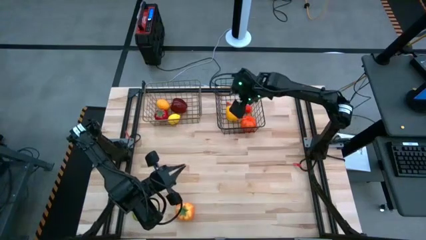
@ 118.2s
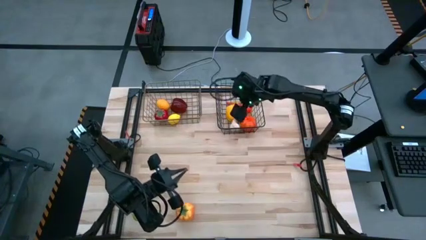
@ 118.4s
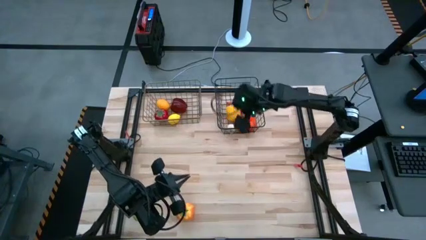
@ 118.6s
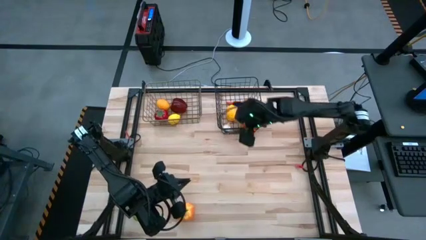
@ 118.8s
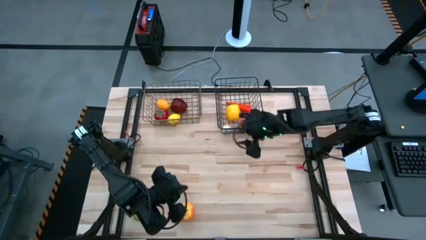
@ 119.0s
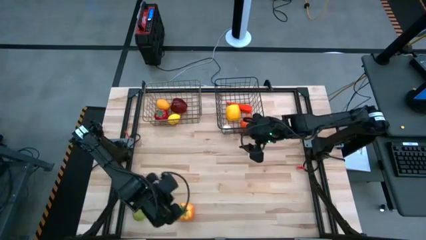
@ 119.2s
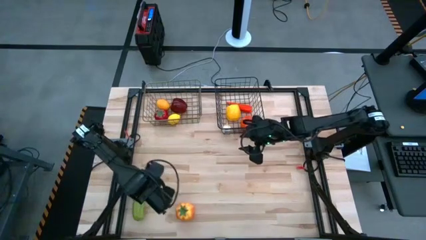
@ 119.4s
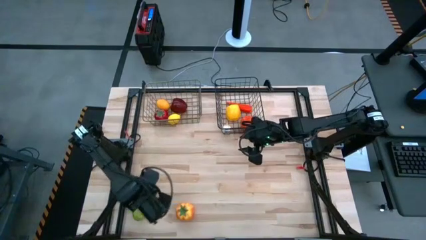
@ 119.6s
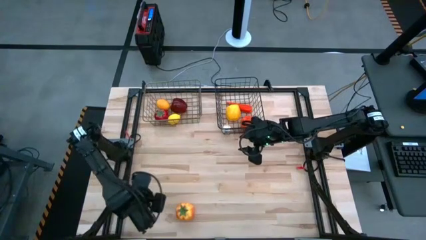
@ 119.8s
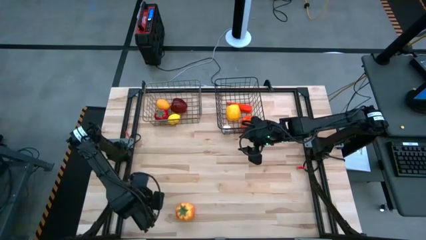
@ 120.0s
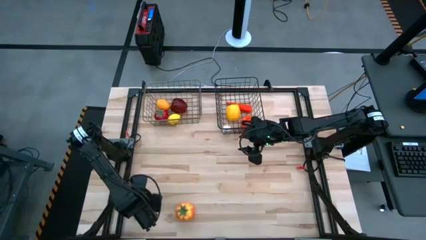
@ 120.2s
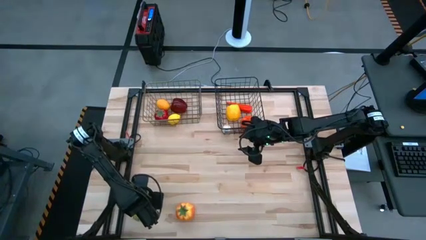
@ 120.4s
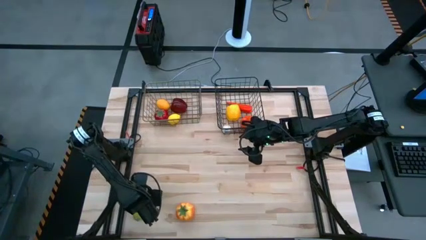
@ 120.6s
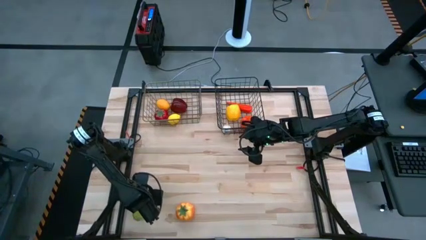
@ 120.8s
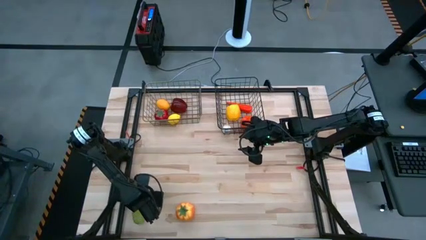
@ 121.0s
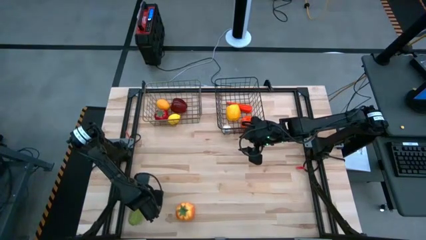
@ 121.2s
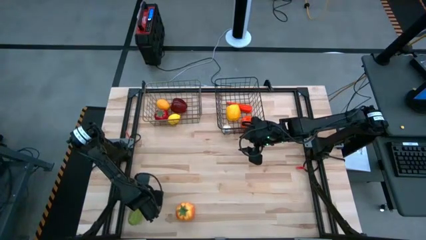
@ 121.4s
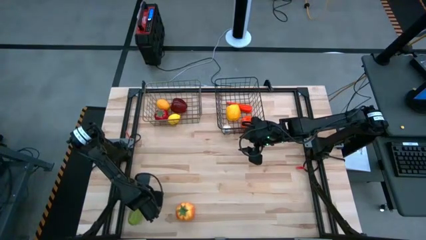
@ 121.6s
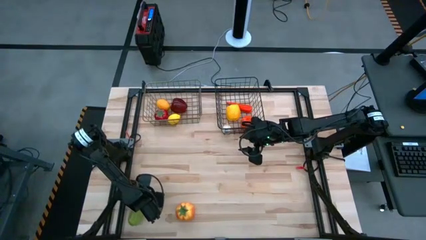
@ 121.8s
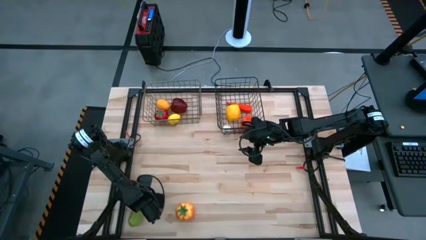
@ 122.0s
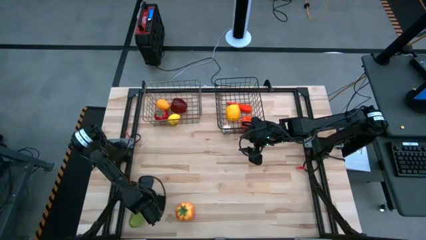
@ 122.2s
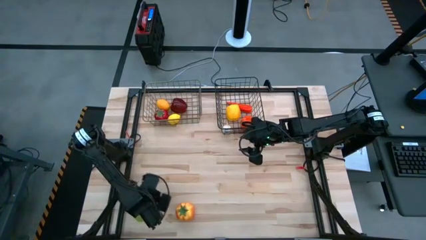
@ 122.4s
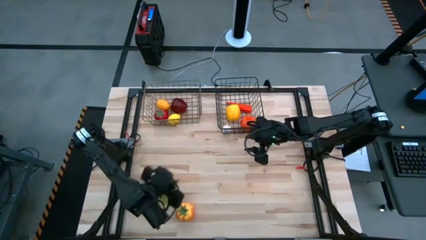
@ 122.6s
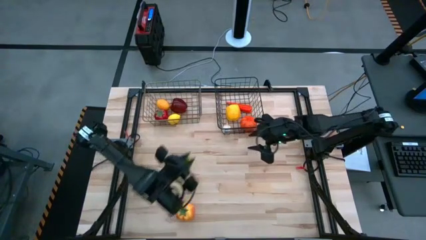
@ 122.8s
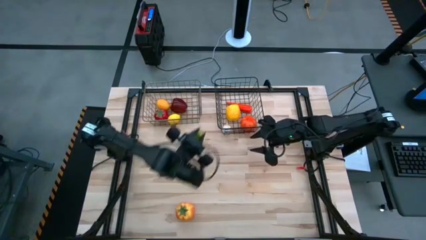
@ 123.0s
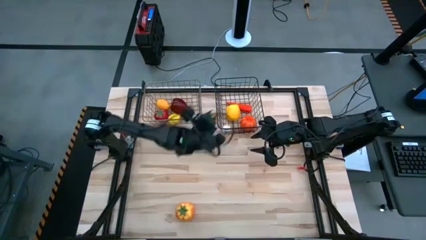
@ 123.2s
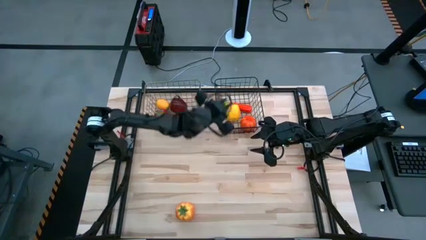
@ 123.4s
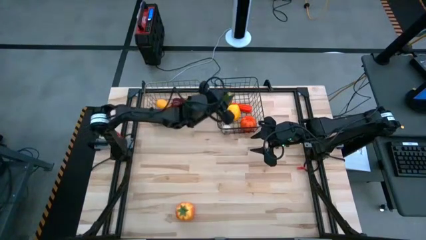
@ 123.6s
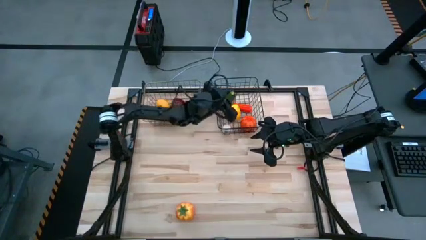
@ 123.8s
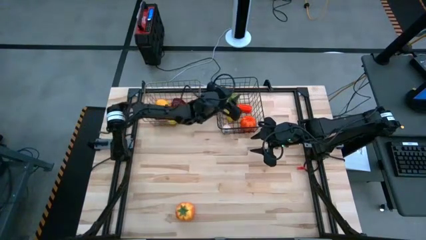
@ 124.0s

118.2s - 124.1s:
Task: Sort produce into baskets
Put the cucumber into the black wire basket

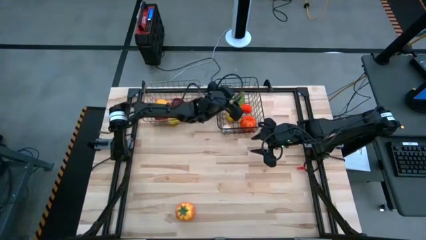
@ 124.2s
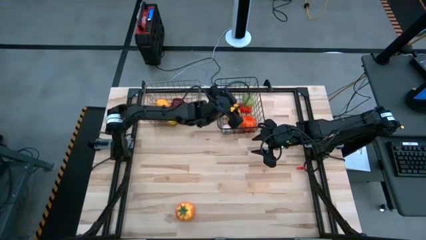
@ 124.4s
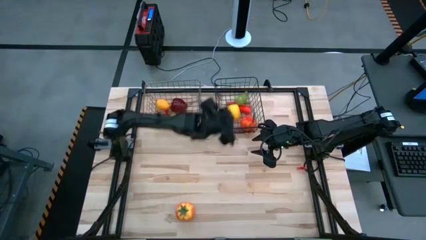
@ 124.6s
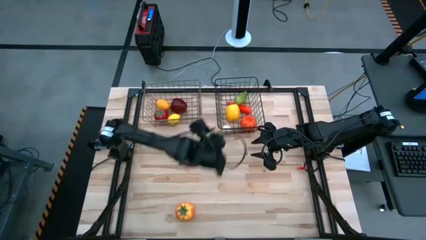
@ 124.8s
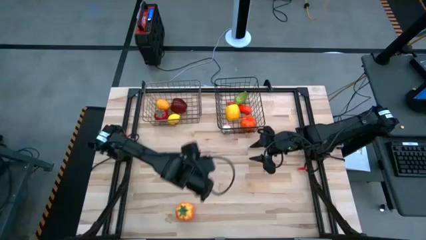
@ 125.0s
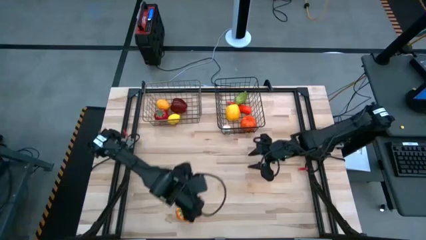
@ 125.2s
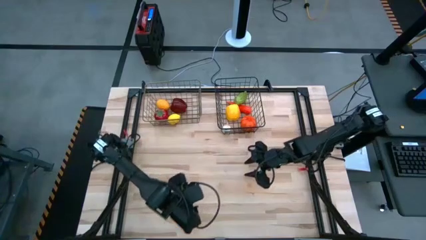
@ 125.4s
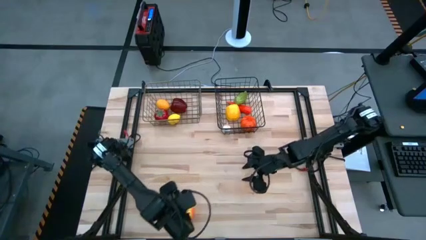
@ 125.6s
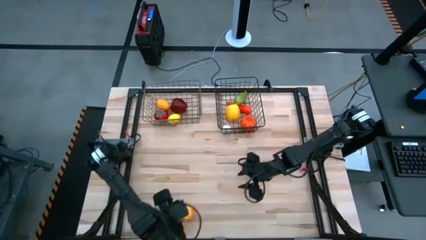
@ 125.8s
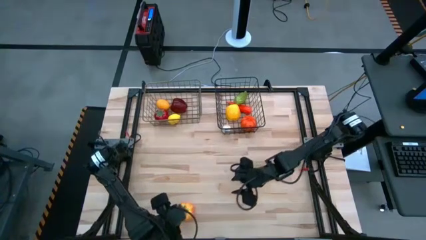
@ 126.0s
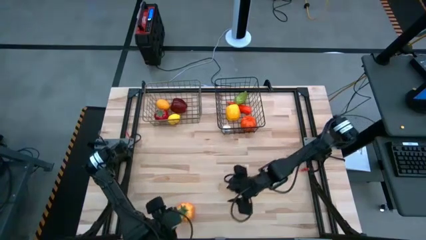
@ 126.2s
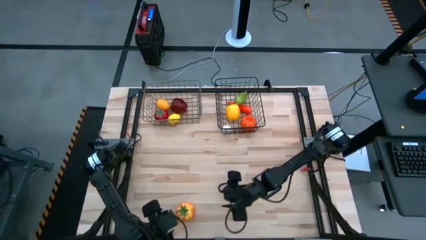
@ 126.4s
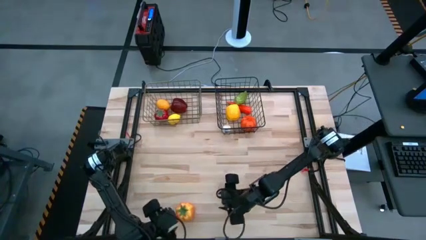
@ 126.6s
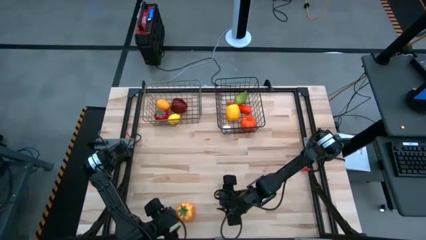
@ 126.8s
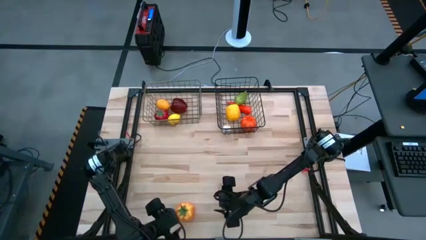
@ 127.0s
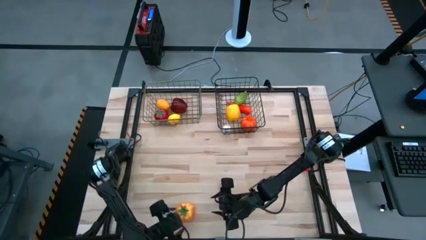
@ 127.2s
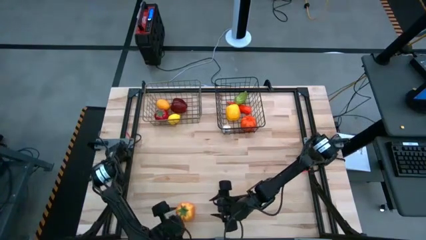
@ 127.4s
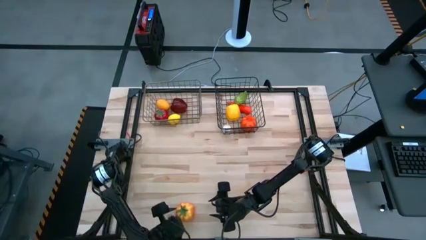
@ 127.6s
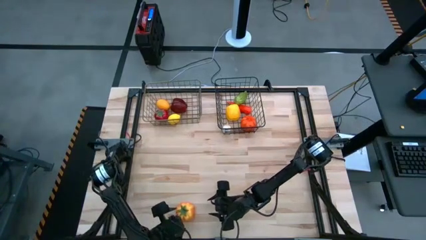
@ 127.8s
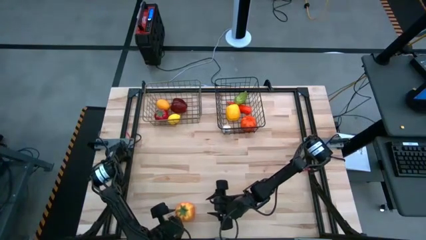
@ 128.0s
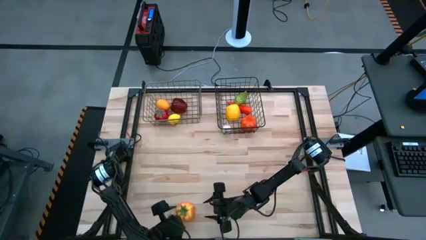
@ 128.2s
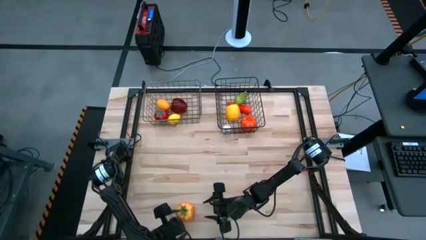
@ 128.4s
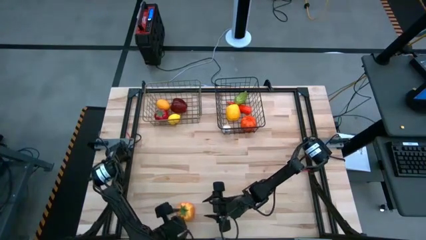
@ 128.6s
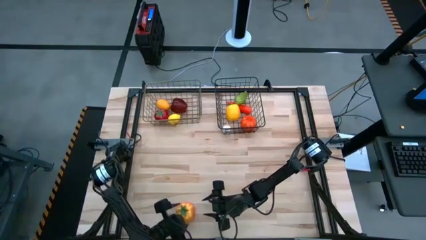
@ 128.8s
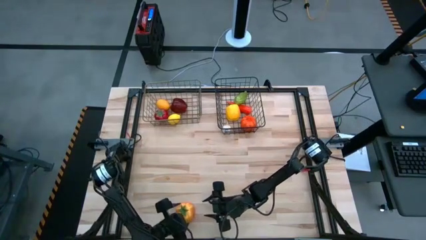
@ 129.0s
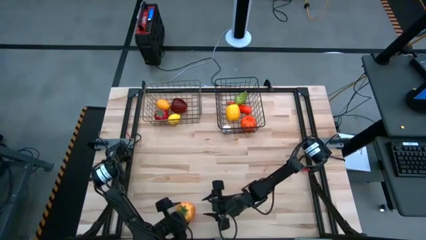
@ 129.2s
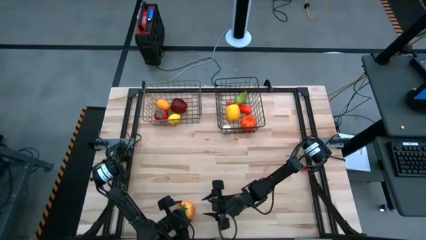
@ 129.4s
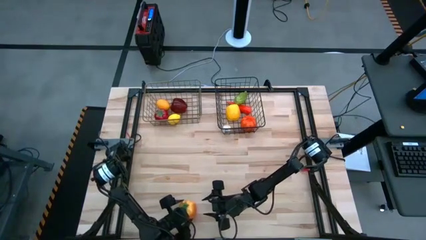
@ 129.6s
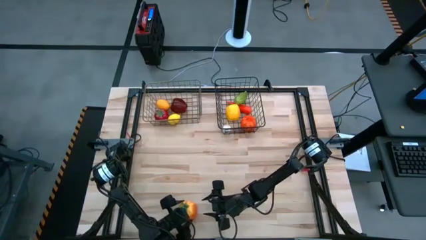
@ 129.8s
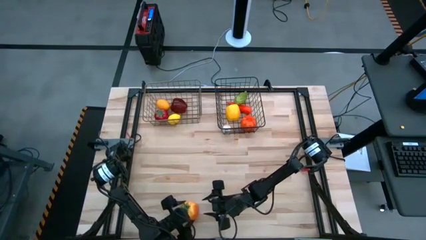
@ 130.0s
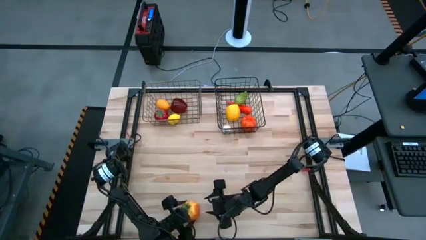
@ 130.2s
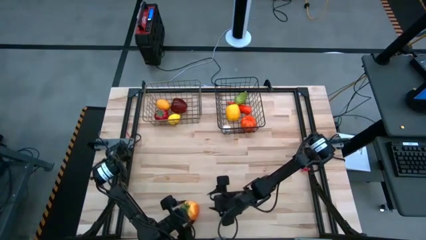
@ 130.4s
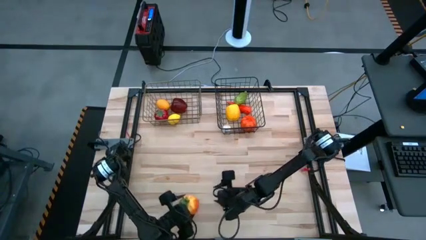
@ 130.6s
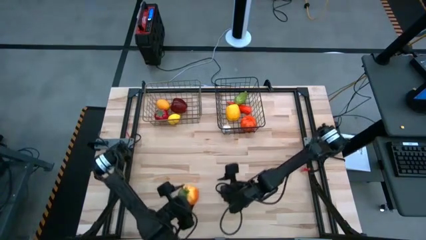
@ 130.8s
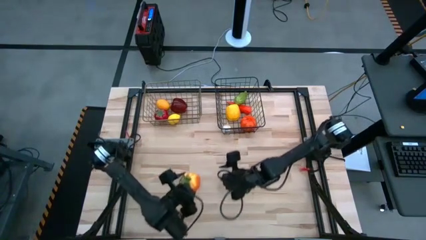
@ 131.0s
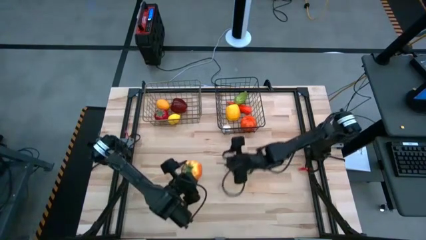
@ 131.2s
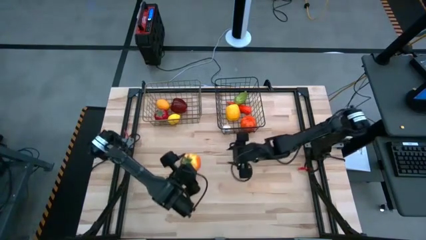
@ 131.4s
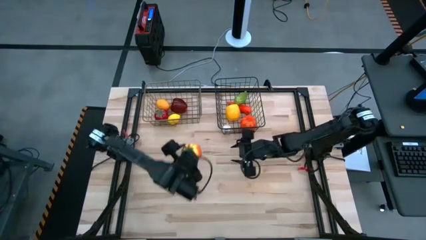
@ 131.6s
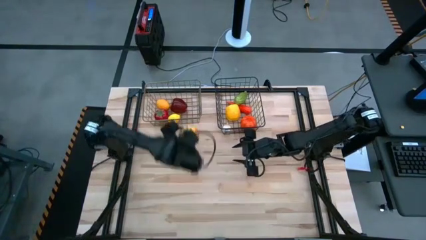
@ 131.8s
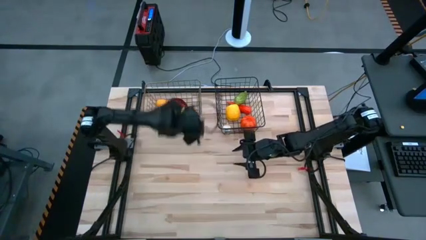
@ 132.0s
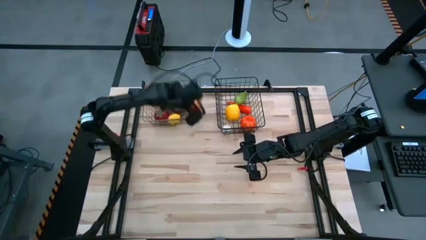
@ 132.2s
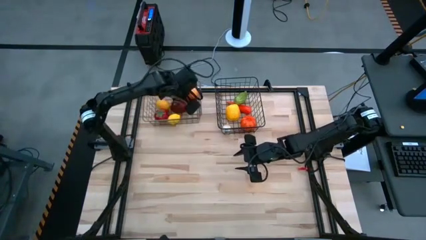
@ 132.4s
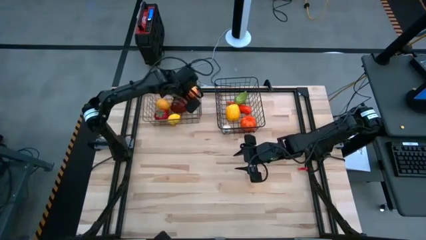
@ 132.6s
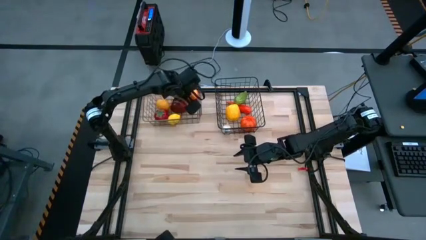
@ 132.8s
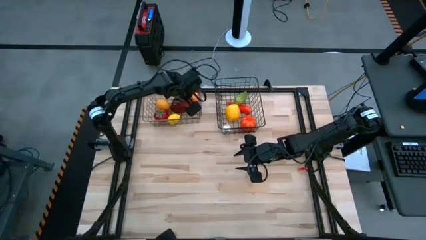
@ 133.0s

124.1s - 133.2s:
Put the tomato into the gold wire basket
